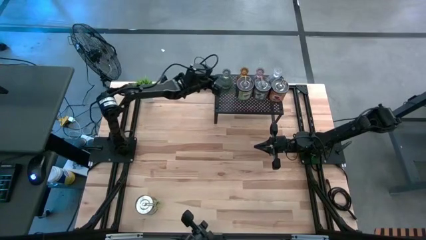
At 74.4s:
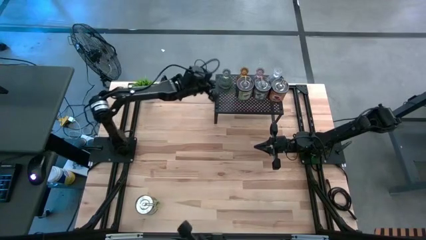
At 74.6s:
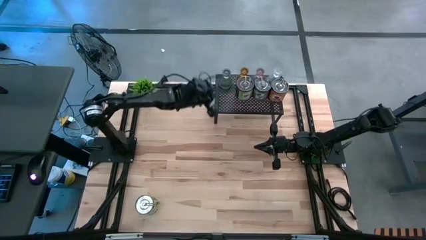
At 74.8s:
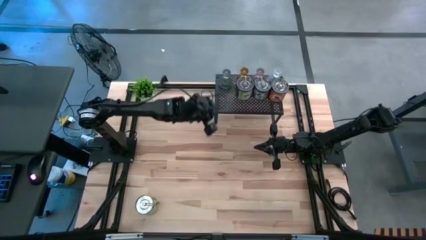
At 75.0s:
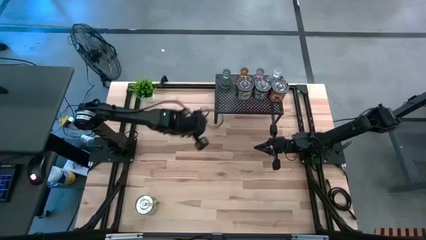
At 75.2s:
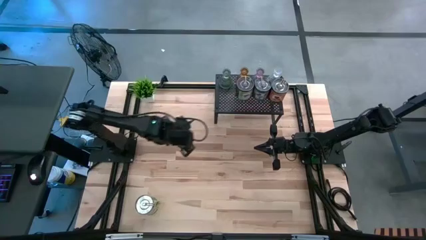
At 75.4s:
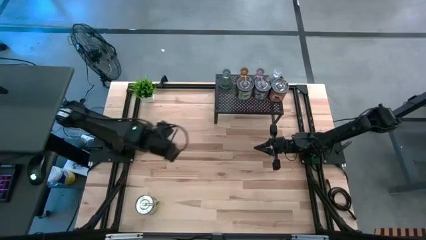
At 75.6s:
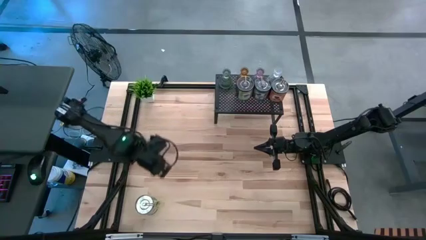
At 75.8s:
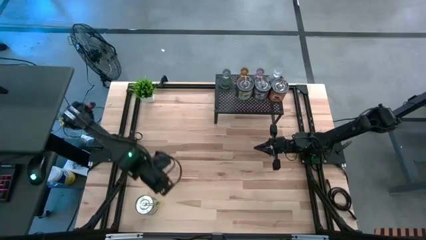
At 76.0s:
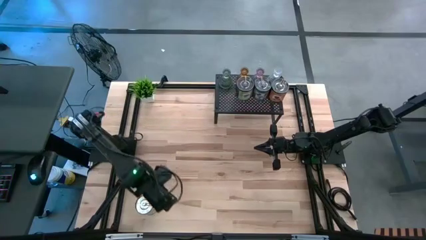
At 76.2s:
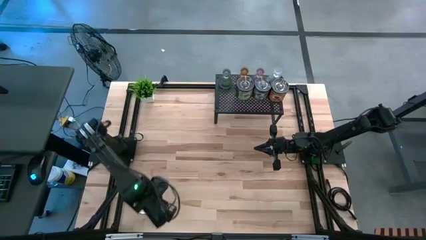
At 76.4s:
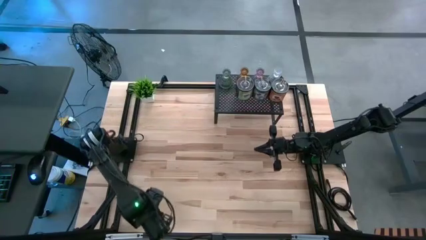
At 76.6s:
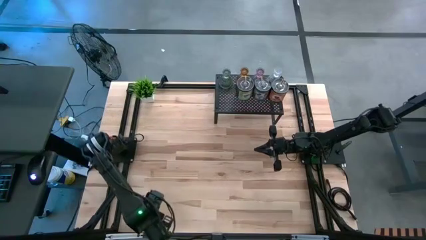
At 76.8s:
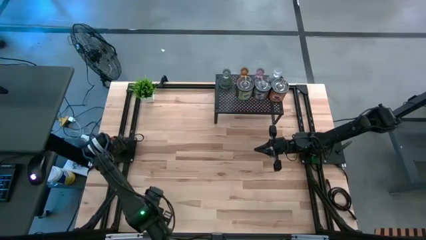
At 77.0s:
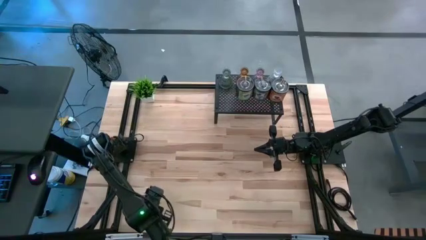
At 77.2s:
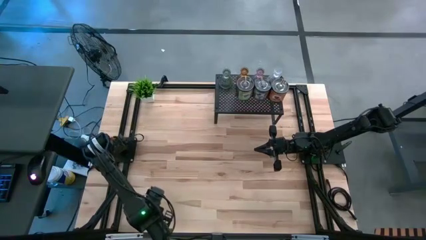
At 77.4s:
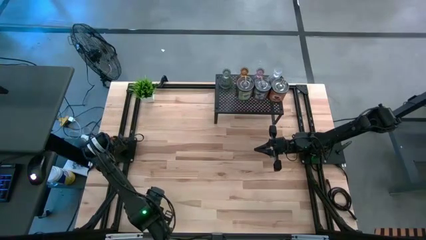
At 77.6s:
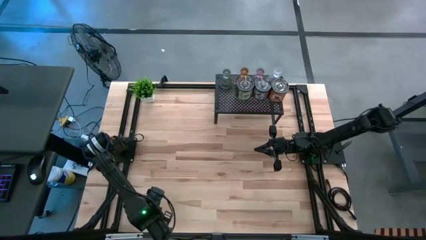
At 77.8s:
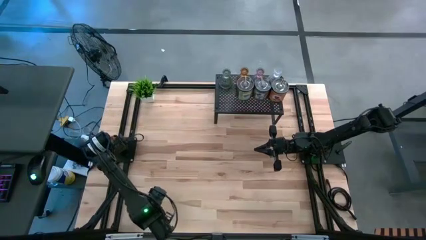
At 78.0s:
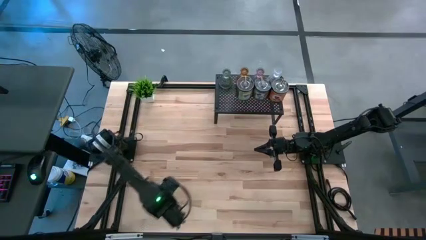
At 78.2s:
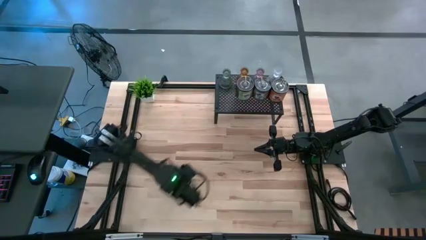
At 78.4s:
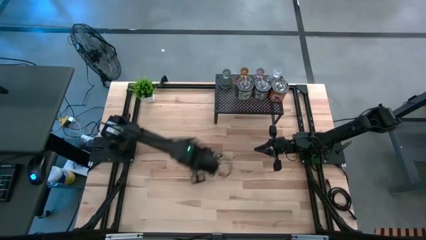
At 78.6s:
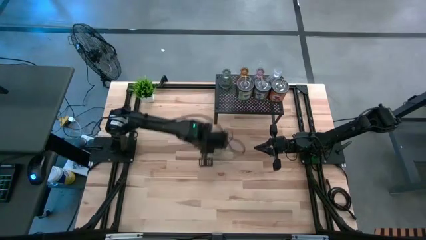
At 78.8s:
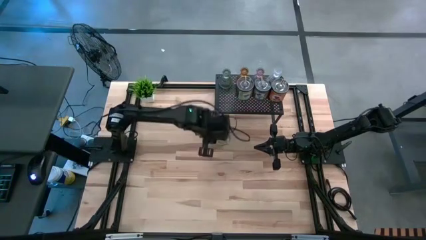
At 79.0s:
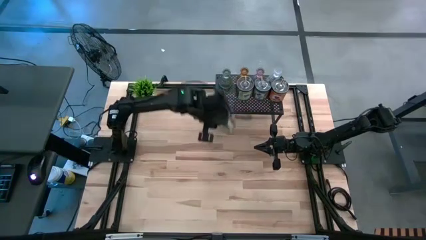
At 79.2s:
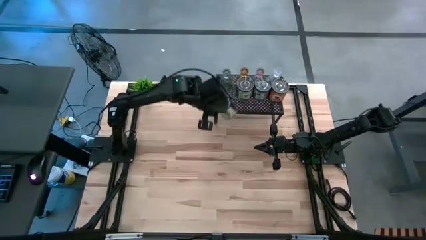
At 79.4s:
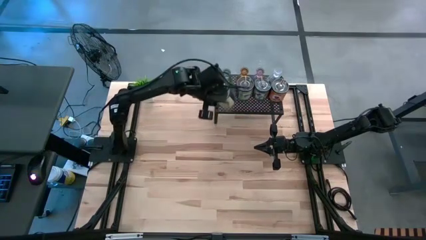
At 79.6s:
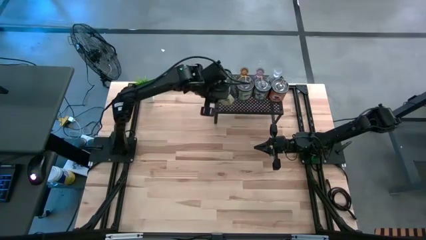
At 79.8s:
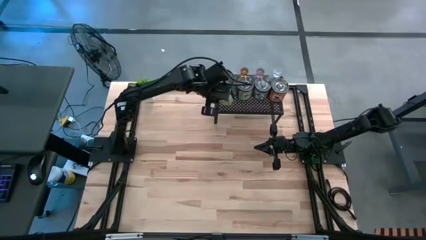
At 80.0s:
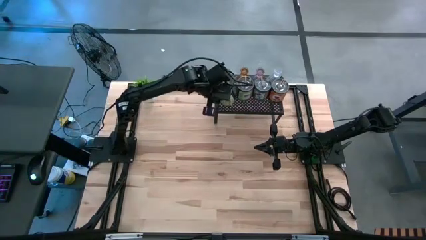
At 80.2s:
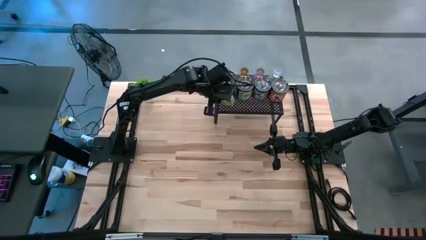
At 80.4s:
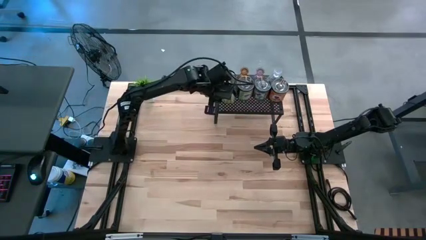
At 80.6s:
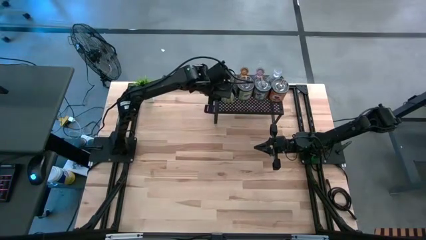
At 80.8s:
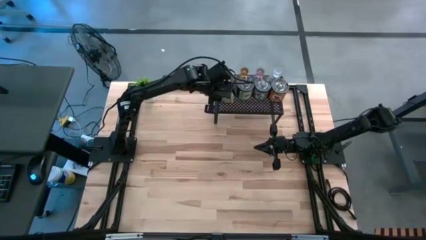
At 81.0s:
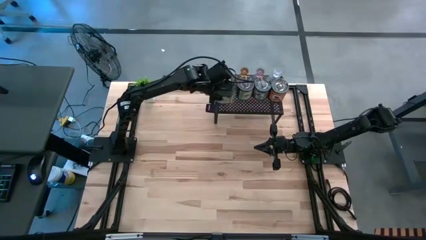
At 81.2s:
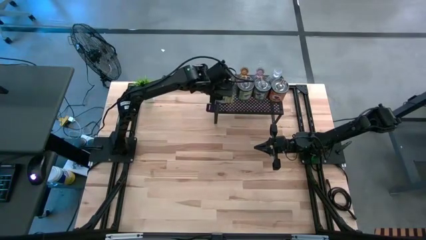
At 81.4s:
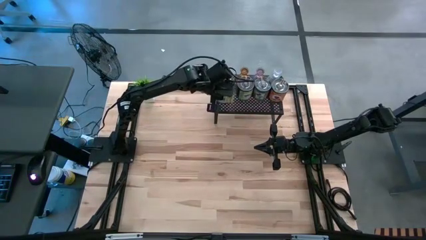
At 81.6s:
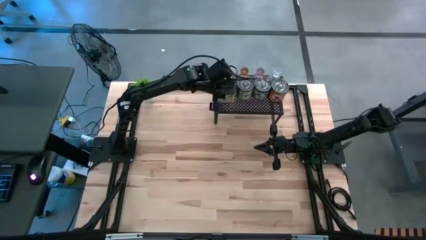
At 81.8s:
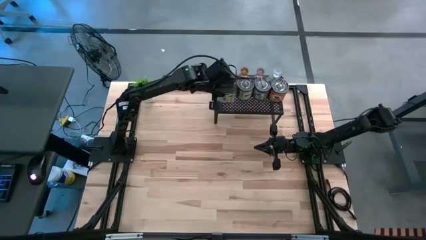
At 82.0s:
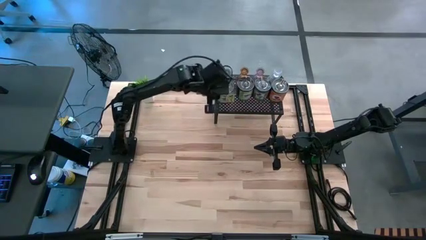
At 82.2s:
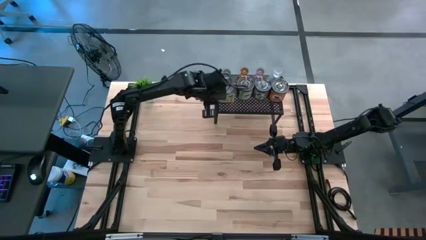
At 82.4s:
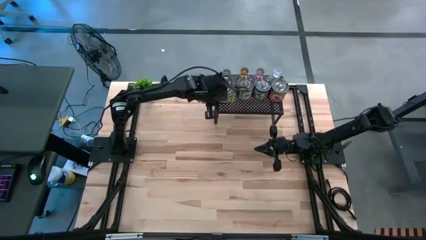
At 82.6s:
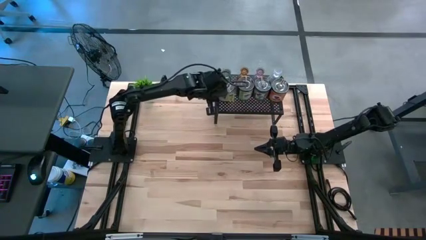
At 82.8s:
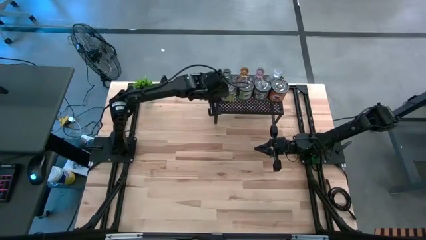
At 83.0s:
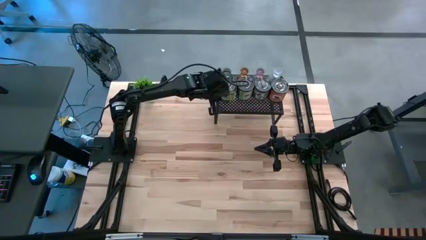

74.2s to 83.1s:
Task: Pick & Place candle stick holders
Put the green scented candle on the shelf aligned with the green scented candle

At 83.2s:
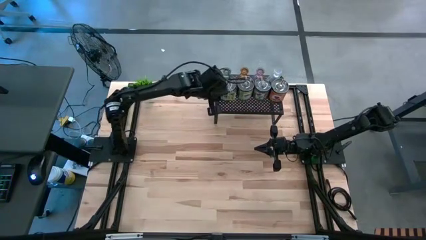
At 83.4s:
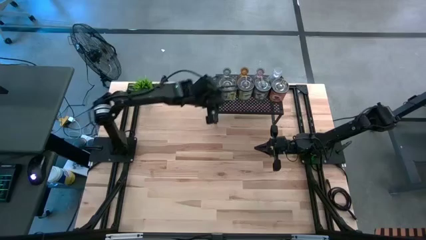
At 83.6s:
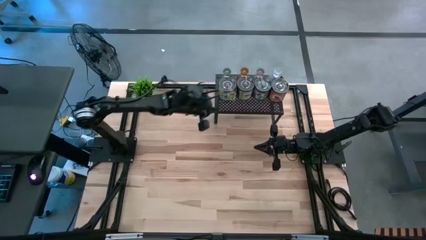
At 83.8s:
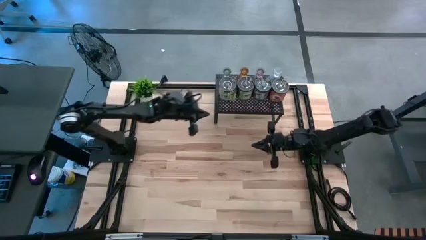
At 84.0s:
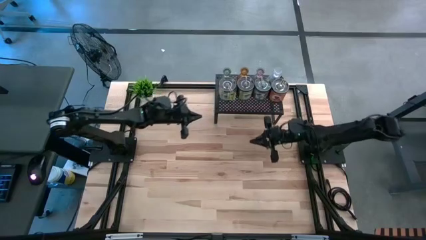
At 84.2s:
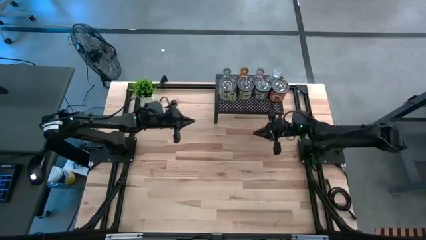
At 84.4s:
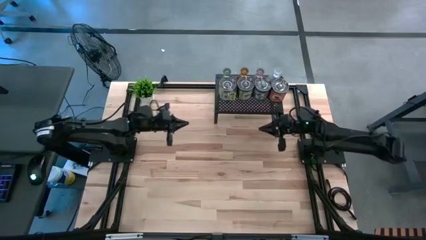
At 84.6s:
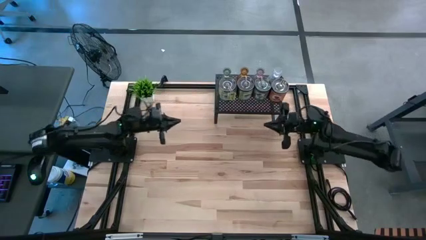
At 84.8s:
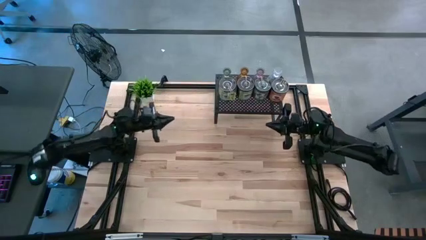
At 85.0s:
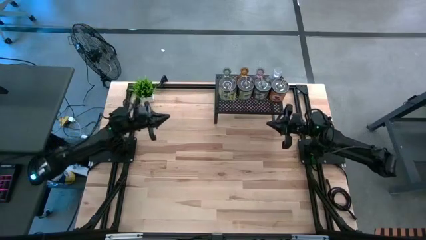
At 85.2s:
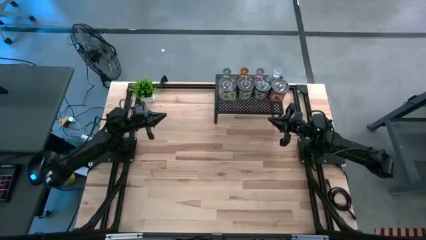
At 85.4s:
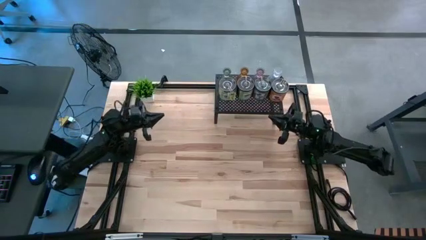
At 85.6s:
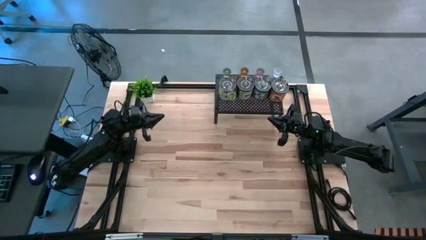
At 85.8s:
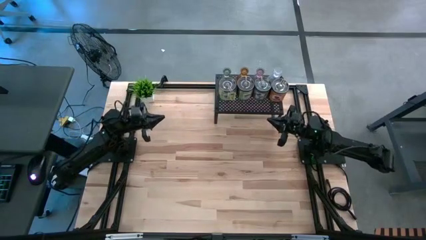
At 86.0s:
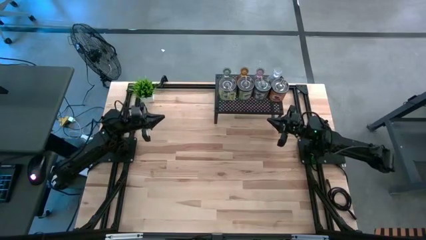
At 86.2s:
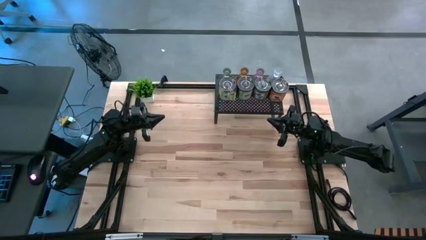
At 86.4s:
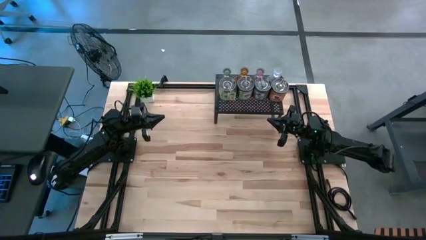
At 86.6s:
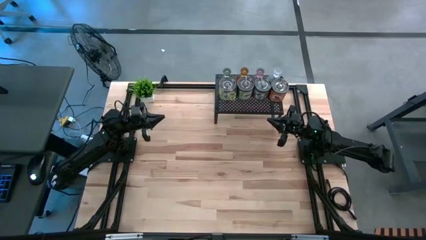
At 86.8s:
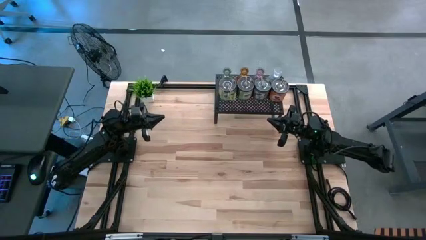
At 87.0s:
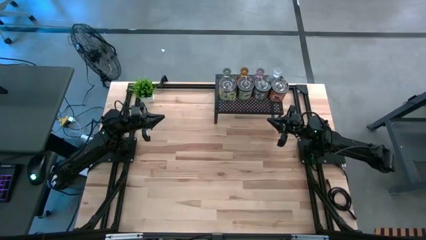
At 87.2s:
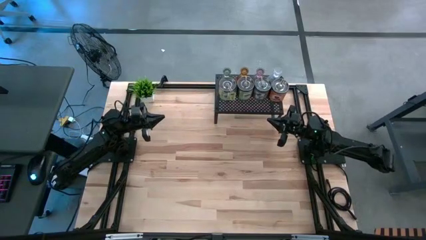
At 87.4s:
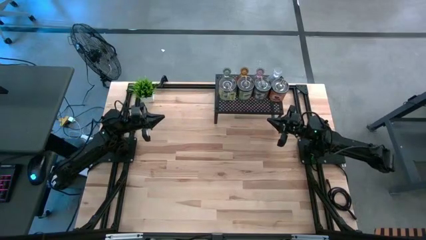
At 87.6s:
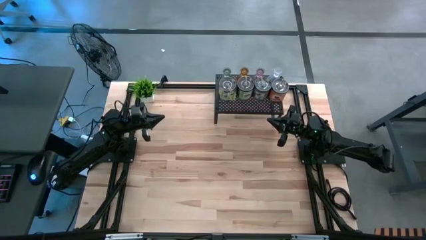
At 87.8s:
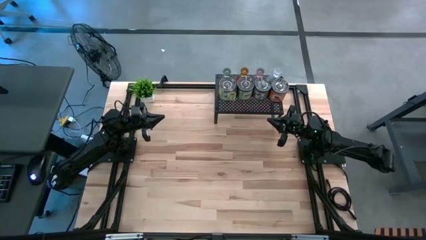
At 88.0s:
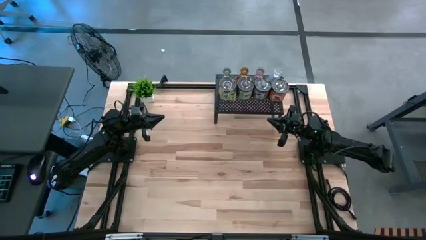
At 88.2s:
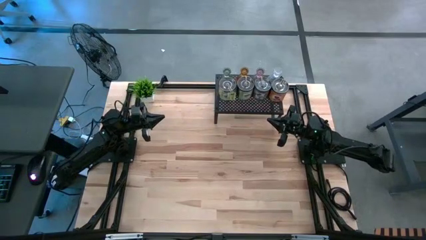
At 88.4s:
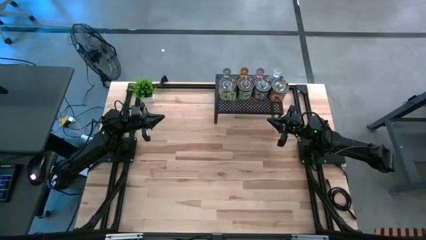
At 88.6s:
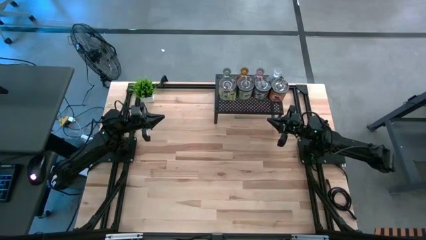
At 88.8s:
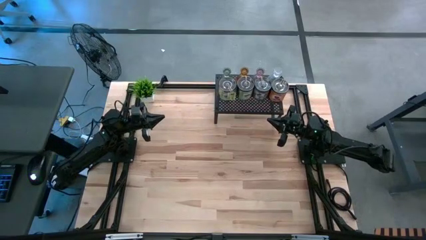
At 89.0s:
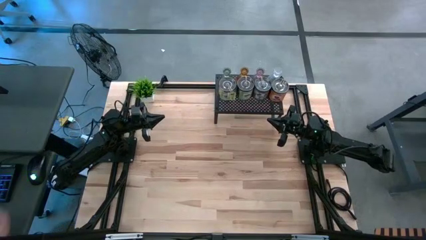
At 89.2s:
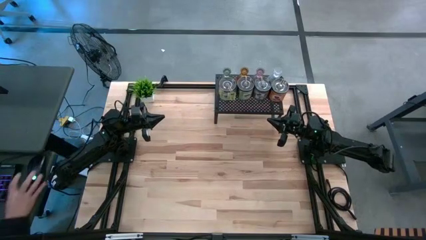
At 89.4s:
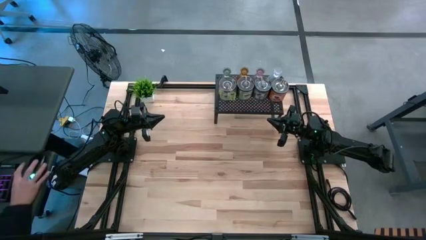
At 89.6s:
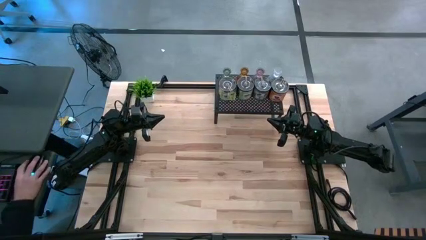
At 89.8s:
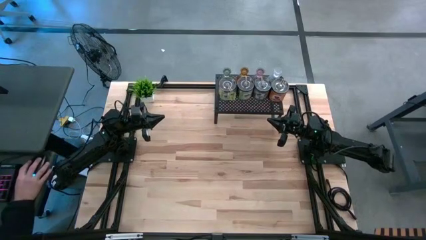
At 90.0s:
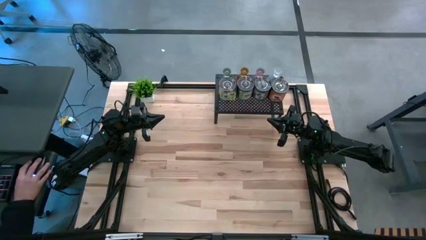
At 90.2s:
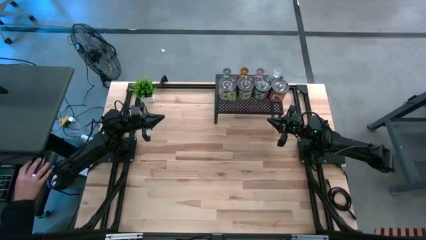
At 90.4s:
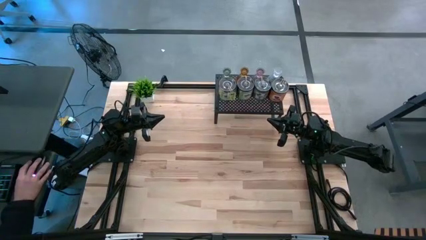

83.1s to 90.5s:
Return to Home Position
